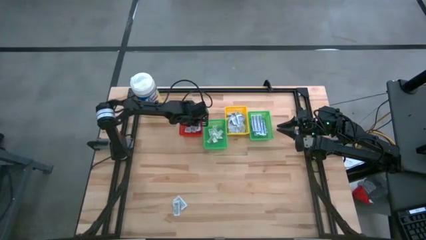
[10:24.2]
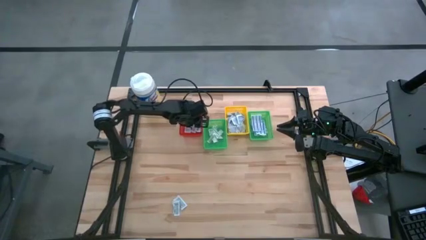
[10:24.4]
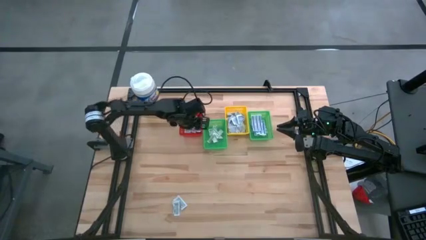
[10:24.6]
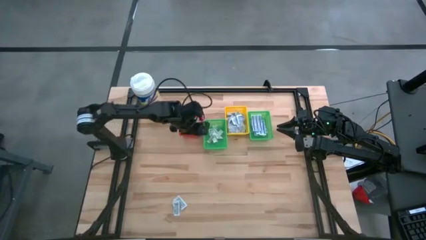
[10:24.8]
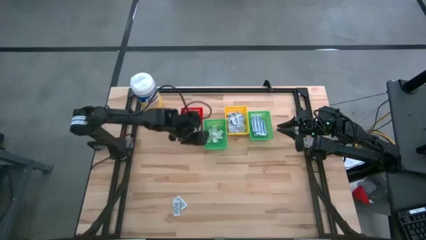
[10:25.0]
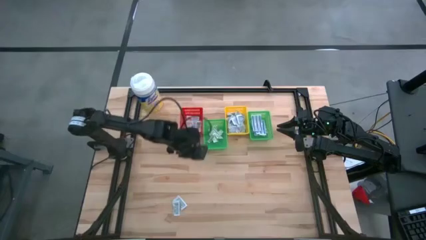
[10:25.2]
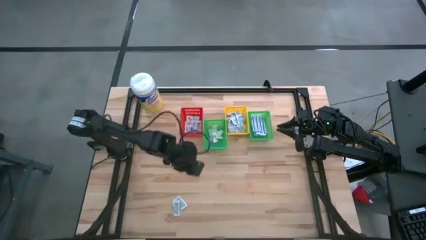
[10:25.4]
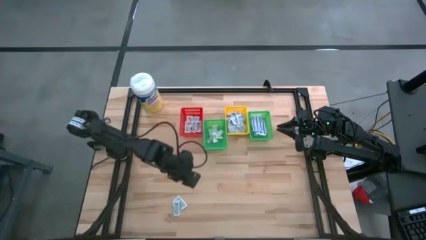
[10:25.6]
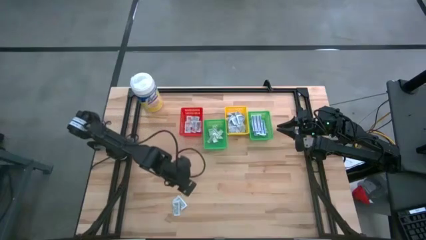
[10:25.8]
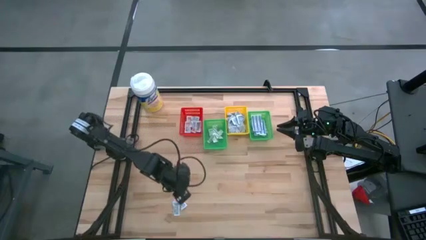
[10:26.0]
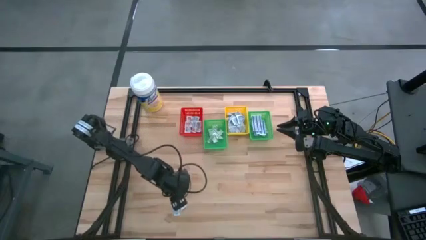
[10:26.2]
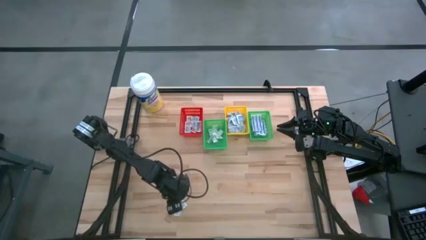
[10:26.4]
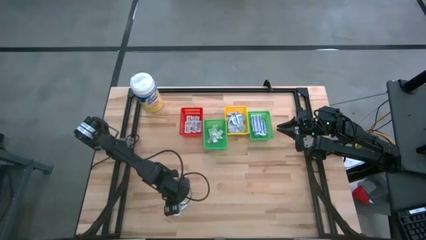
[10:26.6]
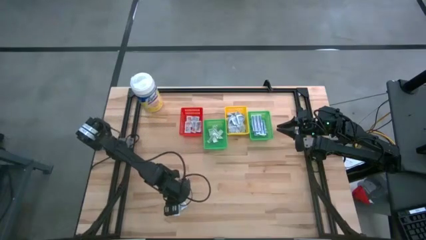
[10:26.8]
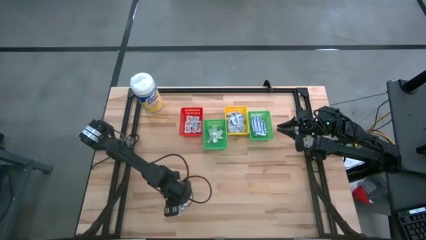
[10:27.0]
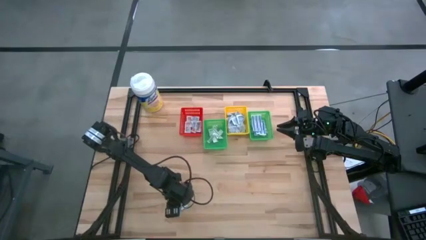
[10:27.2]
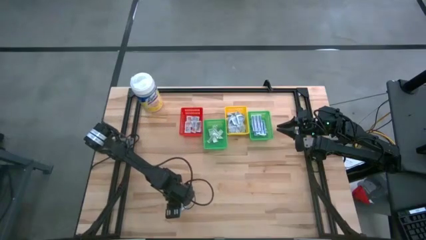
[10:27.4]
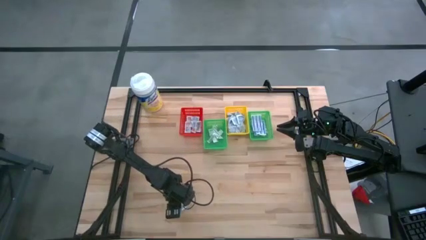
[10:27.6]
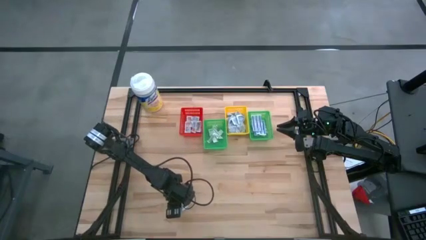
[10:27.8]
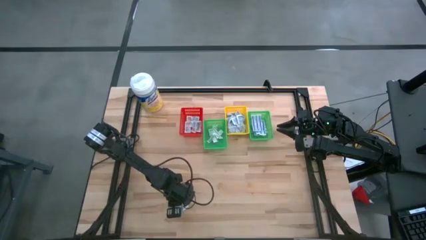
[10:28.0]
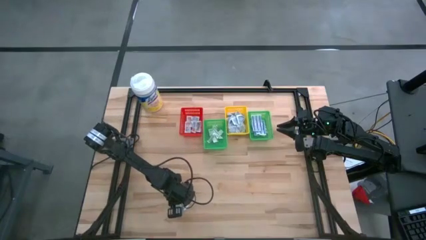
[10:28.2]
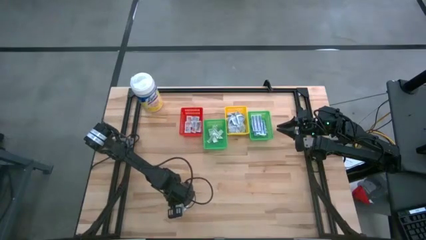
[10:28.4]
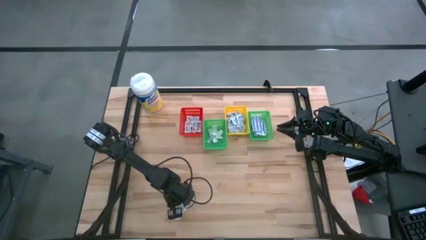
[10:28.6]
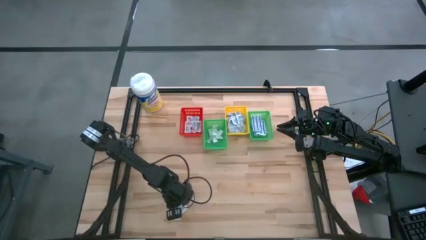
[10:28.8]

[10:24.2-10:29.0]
Task: Pick & Place First Aid Supplies
Put the ointment pack into the red basket

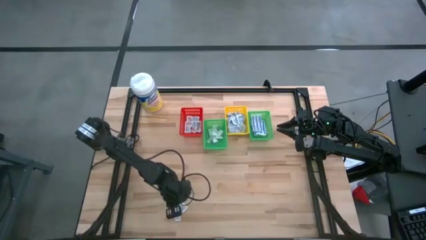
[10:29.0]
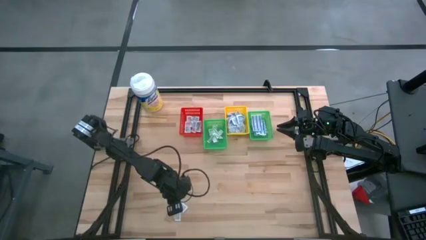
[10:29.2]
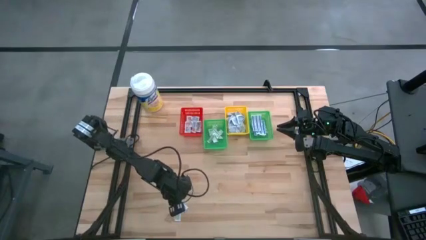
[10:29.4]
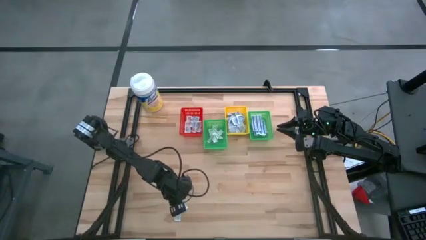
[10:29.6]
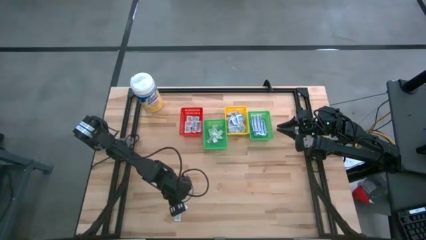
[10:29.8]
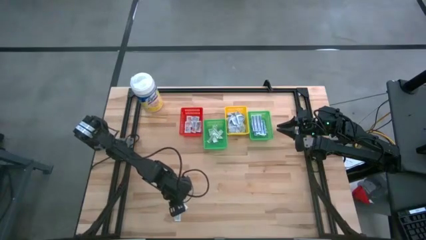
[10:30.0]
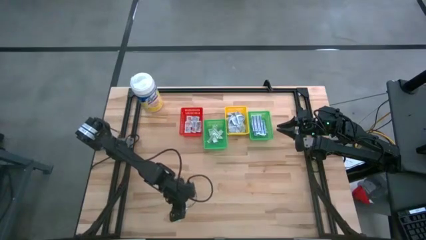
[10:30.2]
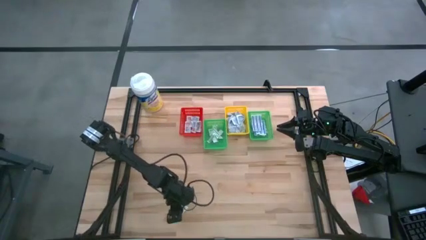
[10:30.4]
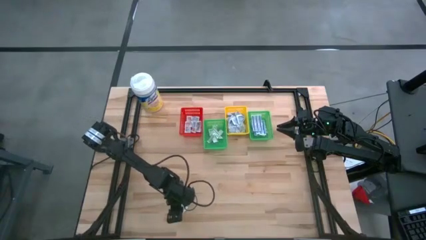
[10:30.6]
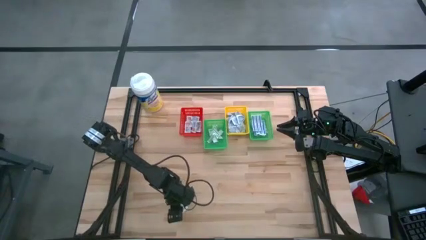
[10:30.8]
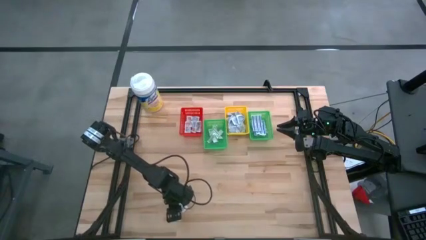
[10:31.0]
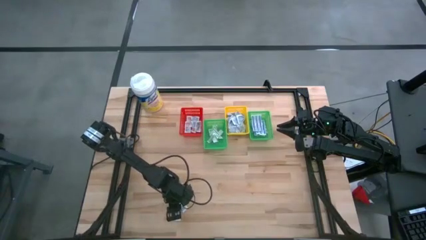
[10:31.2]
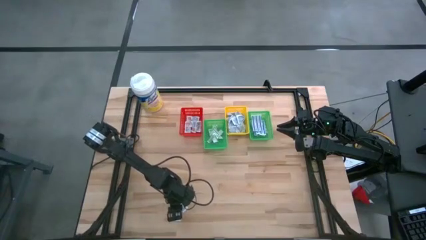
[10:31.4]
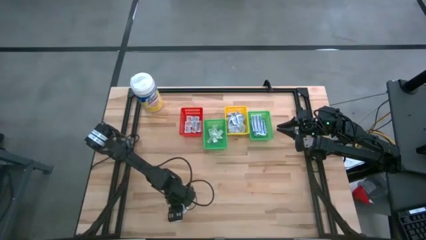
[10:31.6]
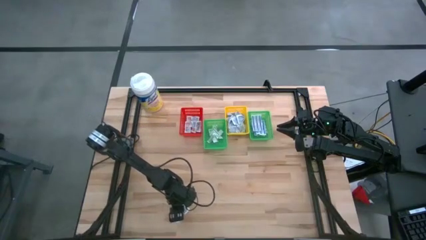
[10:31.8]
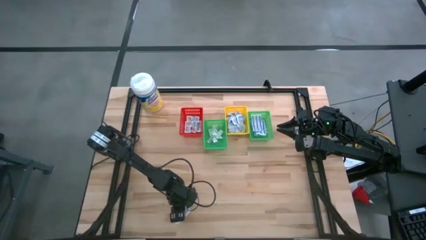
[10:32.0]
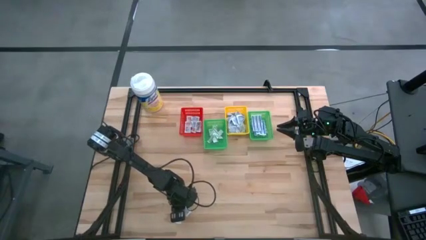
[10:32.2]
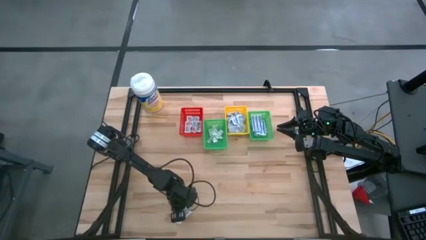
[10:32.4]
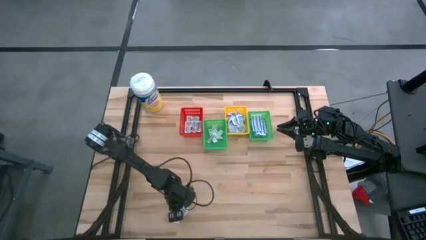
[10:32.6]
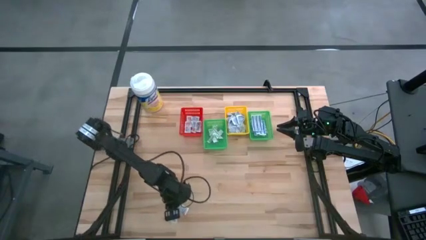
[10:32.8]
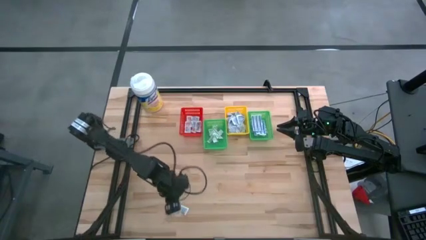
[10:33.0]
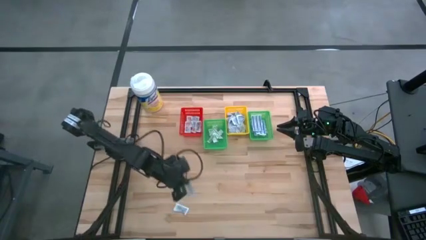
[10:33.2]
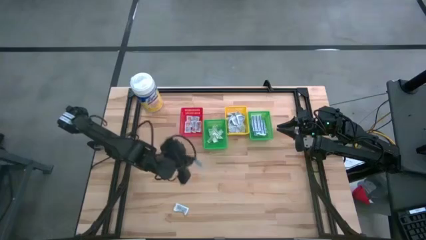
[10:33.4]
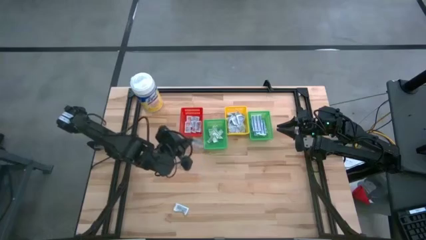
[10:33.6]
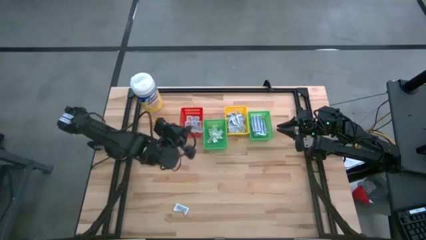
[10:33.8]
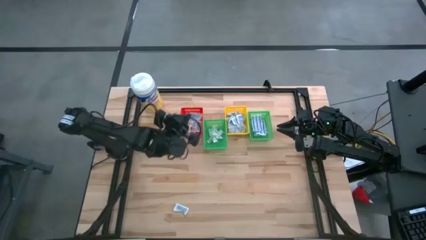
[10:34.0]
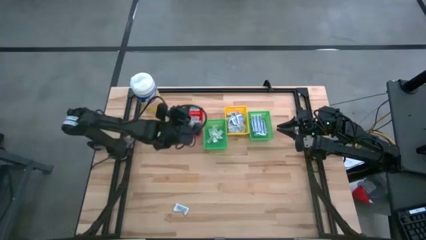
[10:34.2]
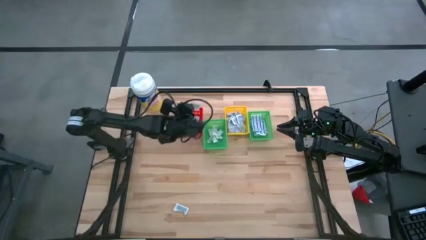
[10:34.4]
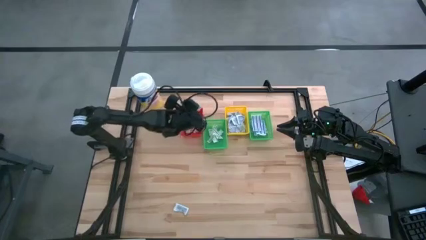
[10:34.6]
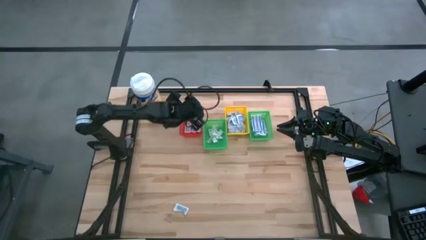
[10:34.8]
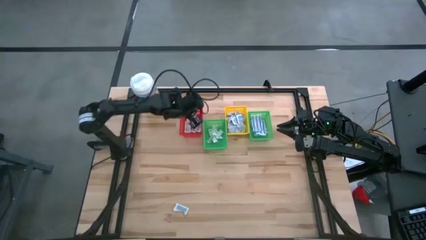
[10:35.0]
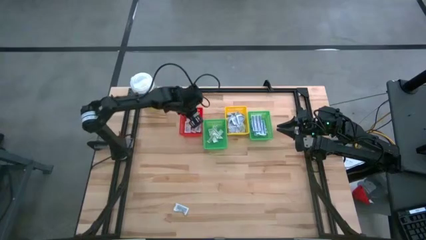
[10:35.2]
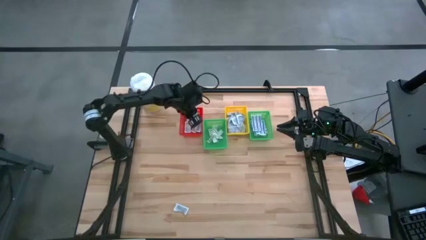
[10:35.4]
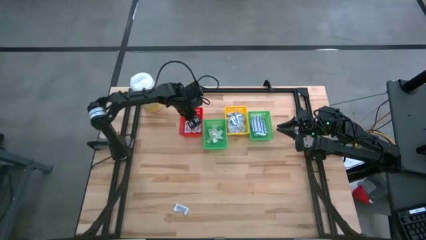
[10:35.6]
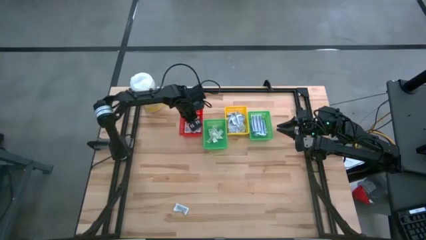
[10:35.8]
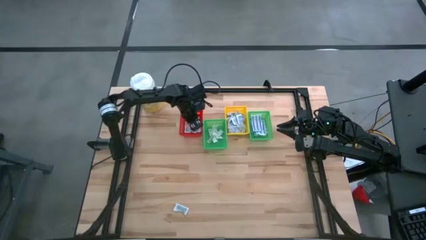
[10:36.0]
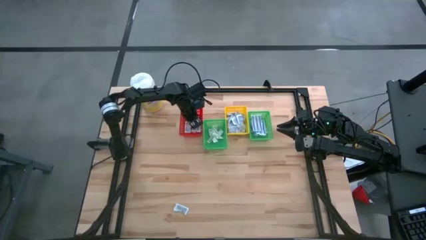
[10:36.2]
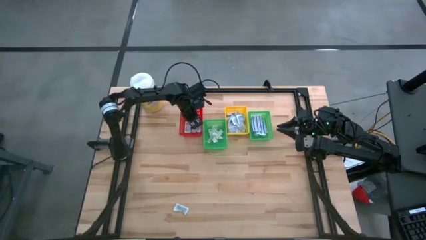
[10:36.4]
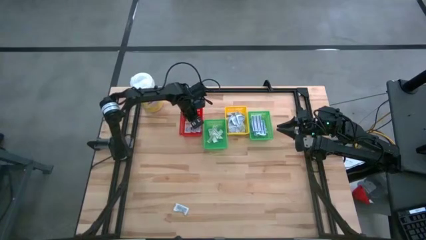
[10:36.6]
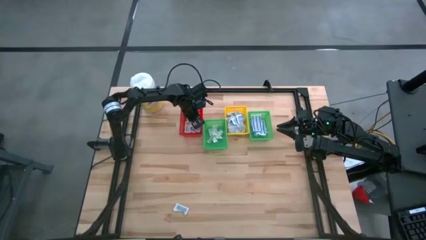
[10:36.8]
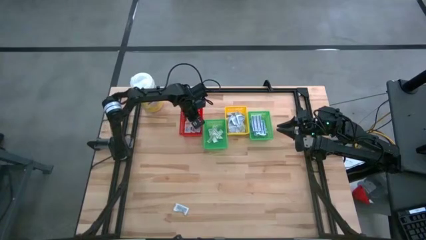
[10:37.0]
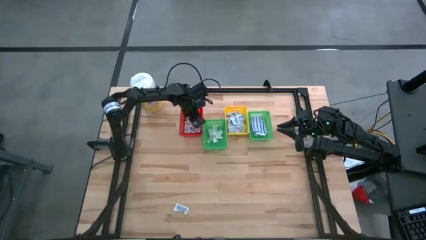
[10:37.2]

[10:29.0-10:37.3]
Put the ointment pack into the red basket

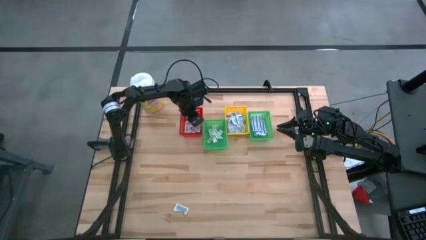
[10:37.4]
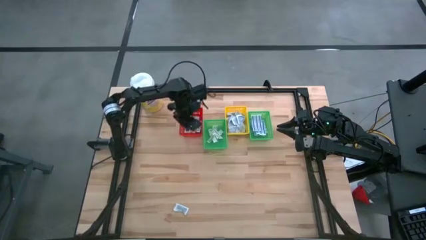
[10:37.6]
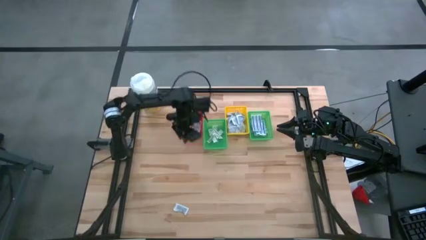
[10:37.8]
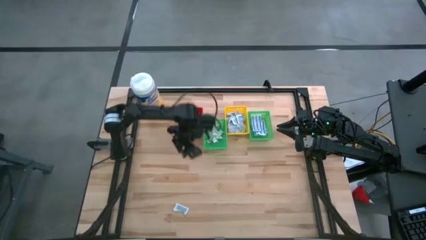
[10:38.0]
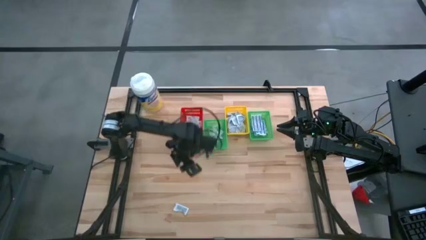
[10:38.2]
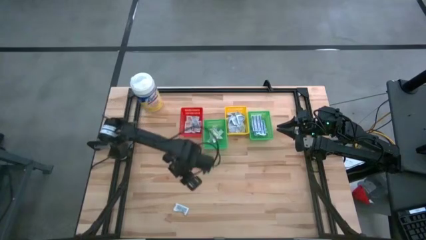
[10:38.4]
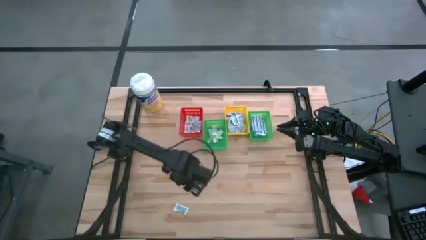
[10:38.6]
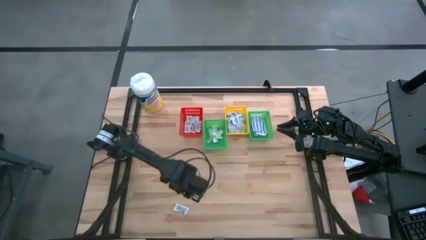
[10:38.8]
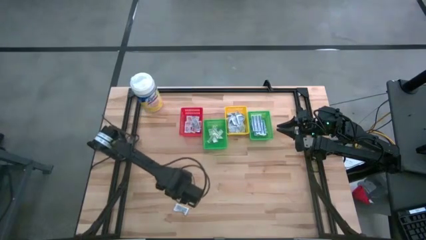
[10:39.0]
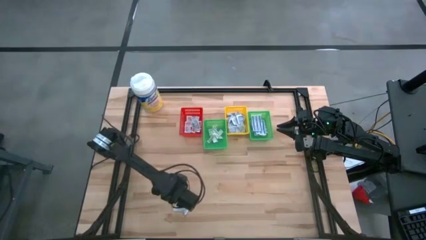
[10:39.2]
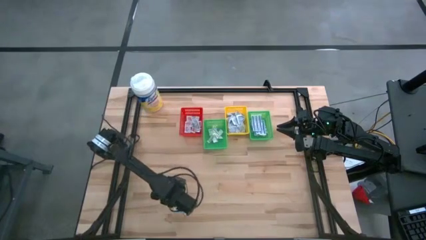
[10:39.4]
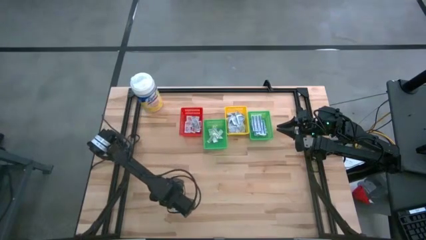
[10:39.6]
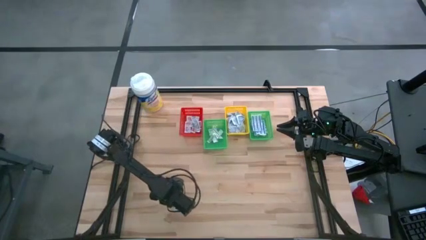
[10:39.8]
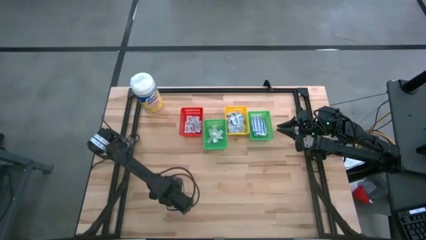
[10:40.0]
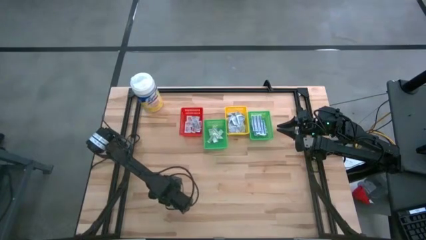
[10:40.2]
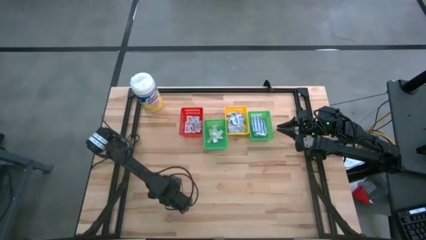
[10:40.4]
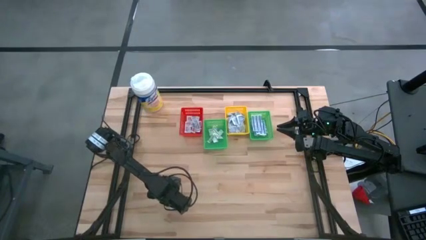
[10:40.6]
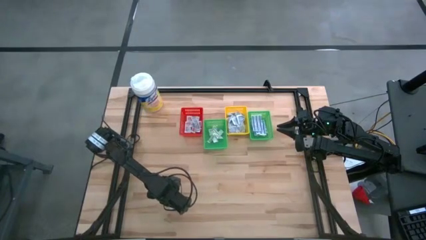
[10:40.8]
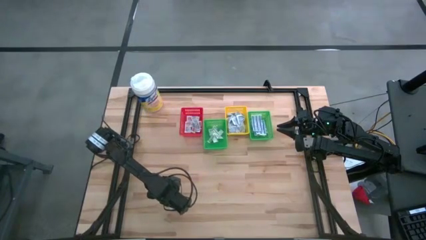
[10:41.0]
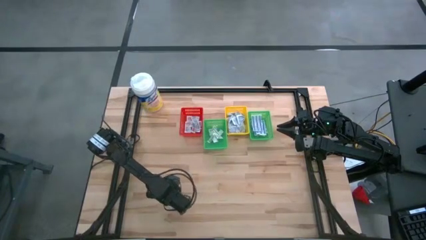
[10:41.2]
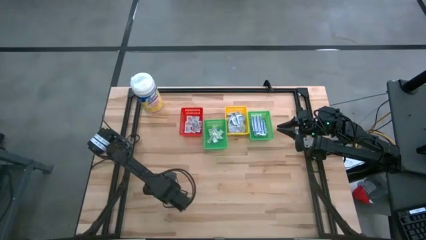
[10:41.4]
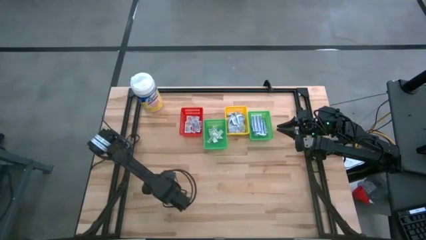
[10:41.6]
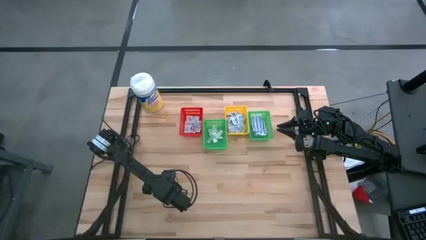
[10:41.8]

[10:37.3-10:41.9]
Put the ointment pack into the red basket
